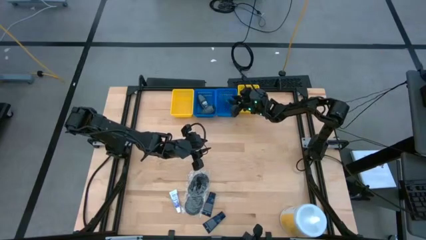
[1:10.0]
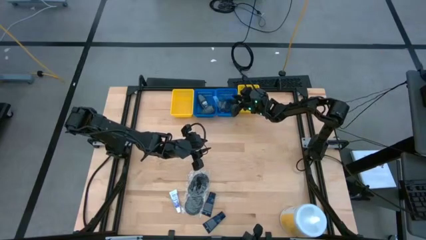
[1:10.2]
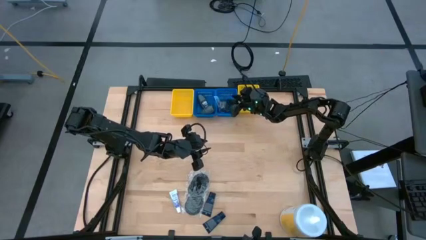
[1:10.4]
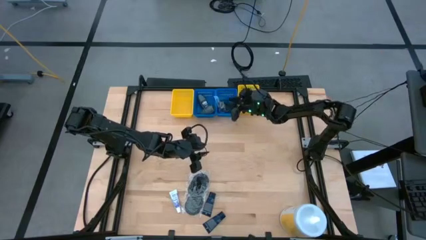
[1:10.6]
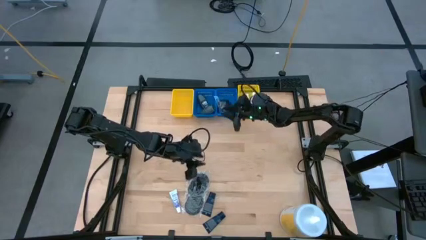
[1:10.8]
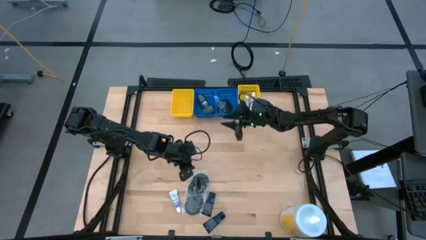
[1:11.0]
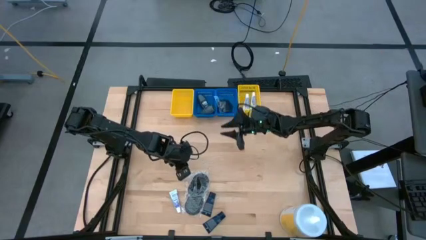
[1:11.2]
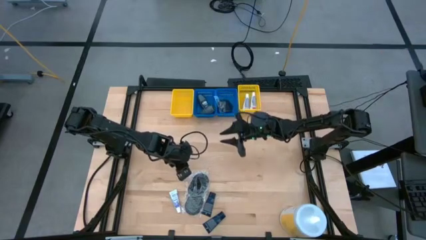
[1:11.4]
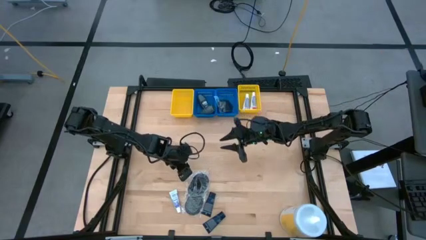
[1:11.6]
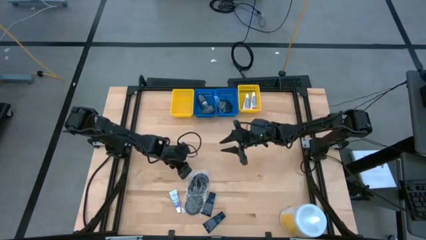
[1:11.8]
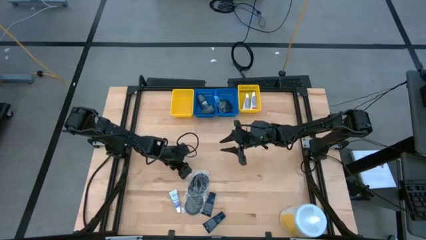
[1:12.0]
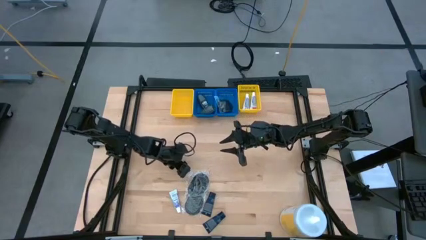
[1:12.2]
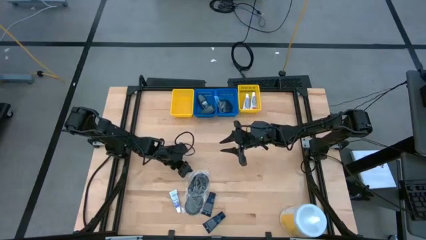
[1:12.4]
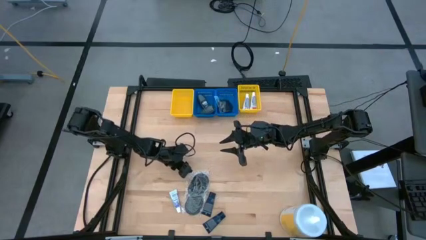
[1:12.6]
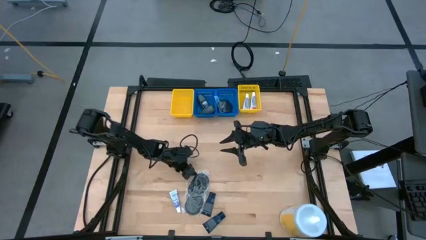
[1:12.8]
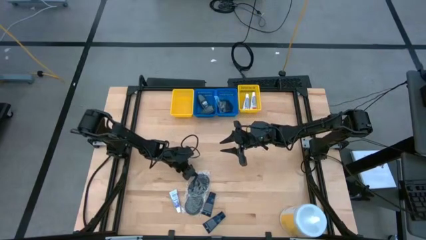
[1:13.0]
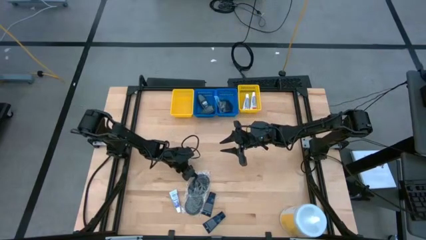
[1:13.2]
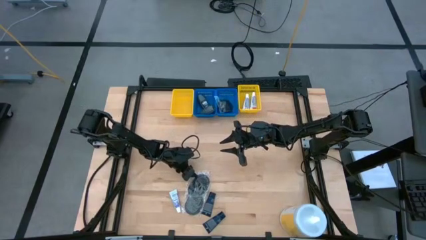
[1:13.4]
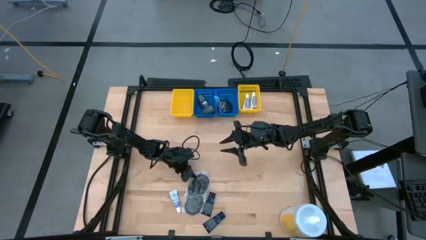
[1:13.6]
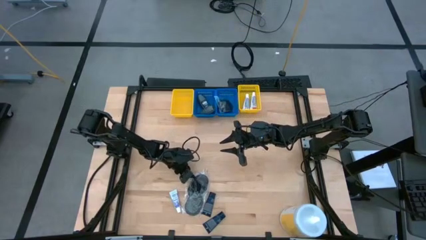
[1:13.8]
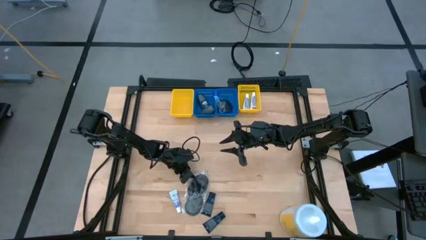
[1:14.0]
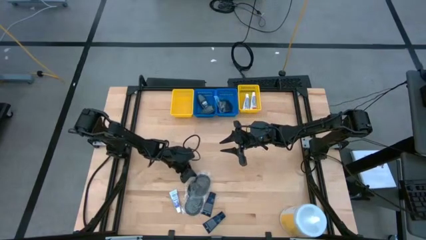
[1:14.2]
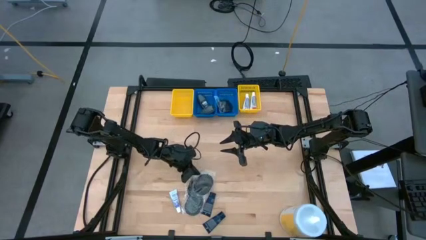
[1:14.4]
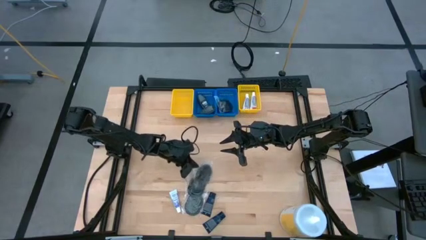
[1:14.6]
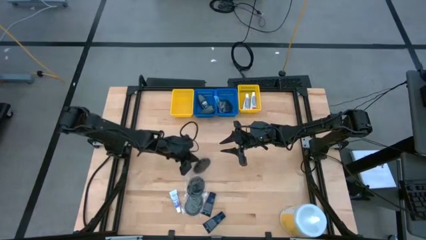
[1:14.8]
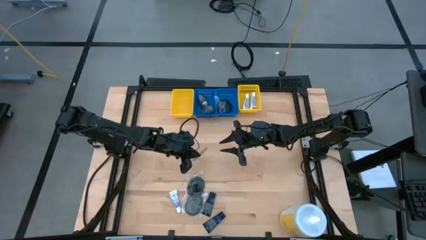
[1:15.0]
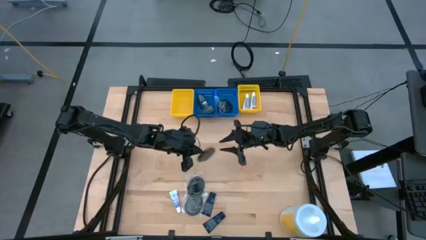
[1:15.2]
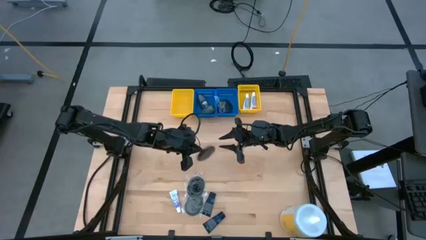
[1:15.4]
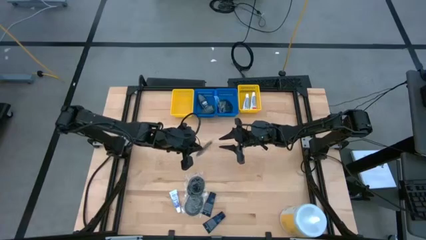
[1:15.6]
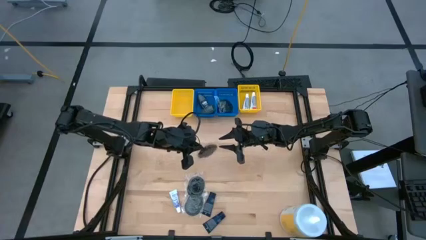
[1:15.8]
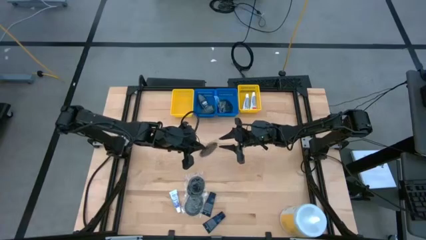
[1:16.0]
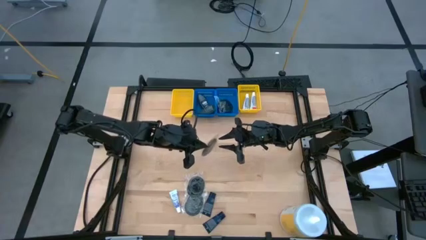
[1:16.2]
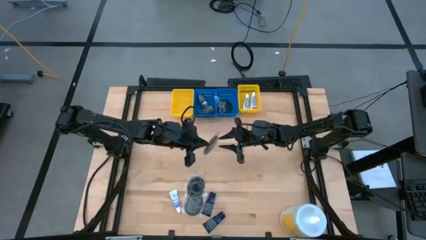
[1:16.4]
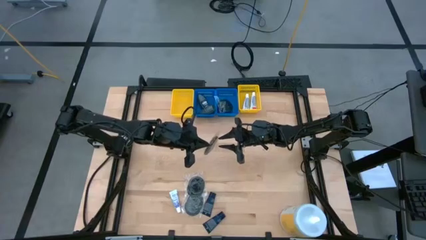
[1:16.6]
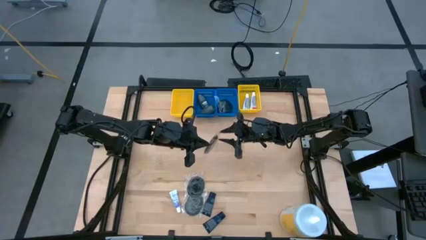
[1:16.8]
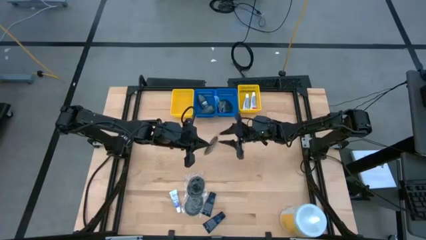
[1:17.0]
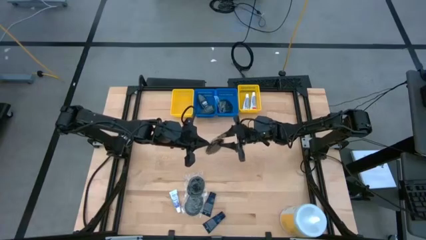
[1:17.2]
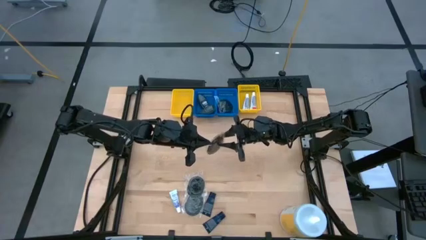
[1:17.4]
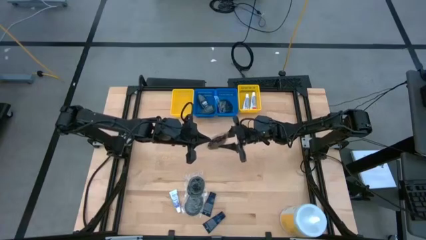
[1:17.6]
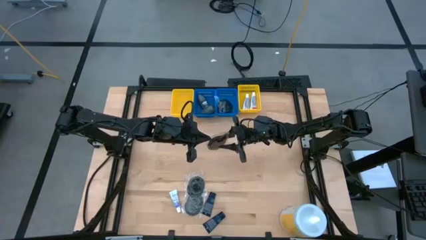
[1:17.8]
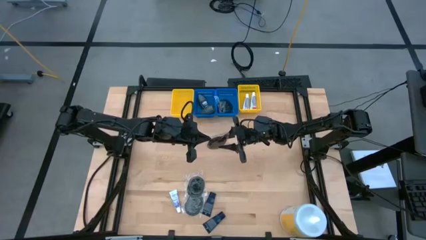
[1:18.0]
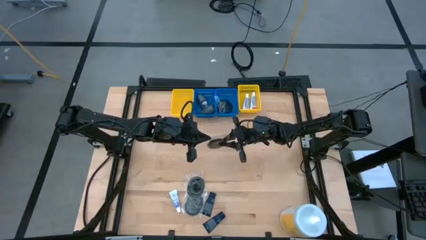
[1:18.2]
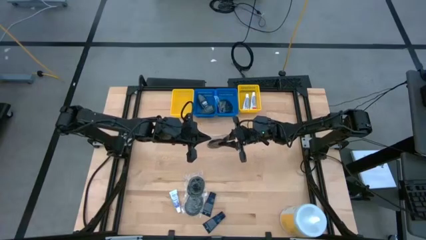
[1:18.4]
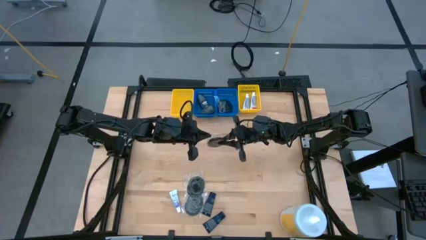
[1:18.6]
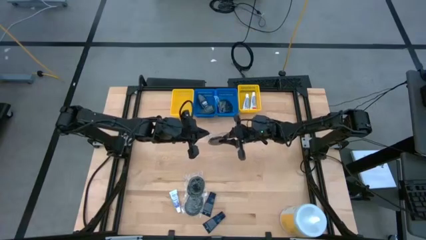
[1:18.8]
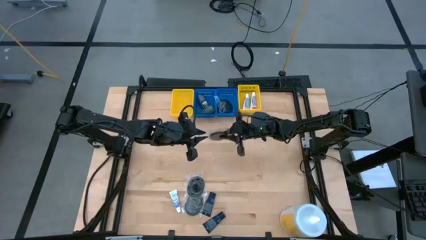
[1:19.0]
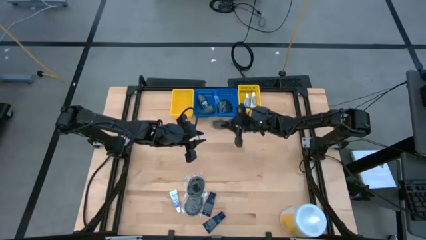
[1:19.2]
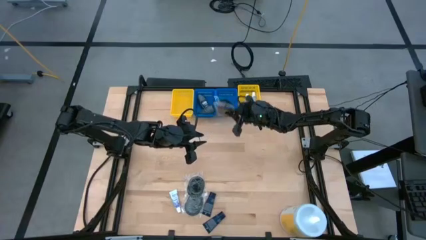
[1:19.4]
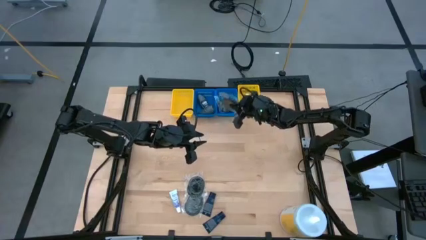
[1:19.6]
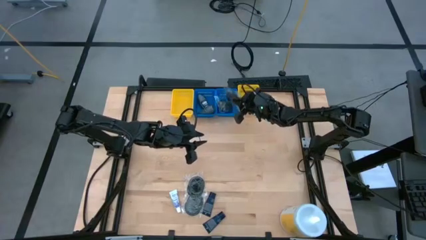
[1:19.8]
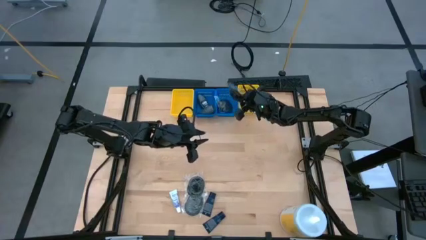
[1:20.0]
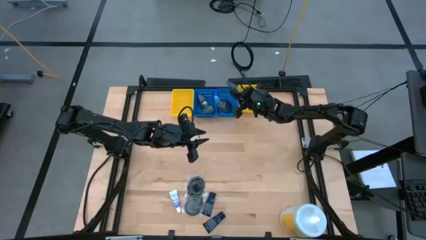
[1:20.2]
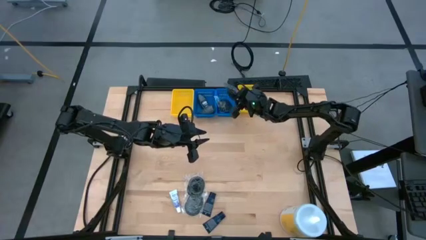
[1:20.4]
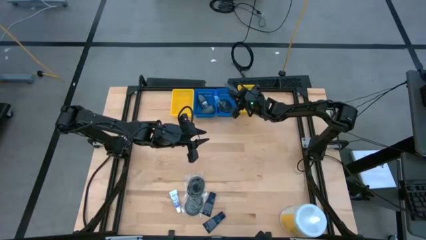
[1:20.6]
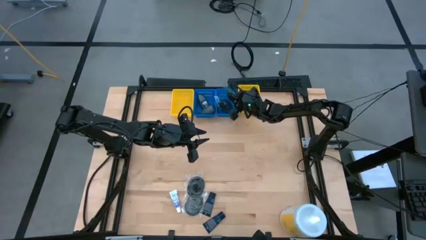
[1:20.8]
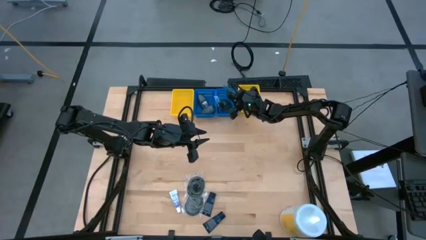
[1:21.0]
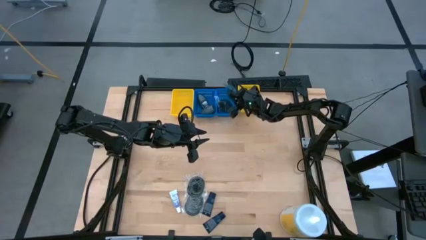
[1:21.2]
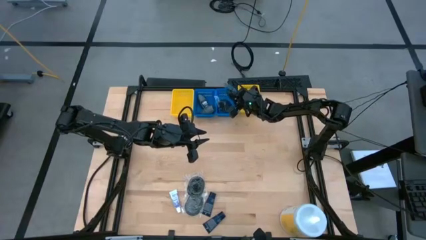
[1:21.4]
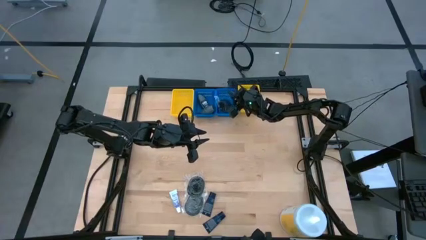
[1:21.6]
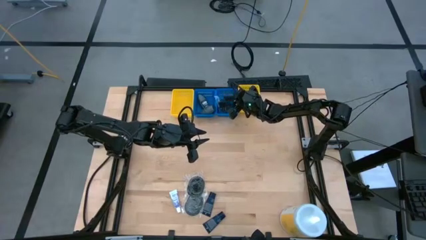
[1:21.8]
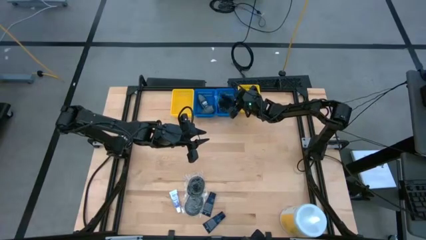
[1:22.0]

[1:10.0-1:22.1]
Task: Pick & Place Travel size toiletries
Put the black hairbrush into the right blue bin
